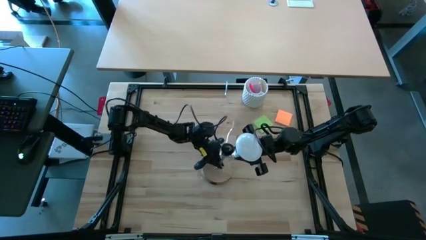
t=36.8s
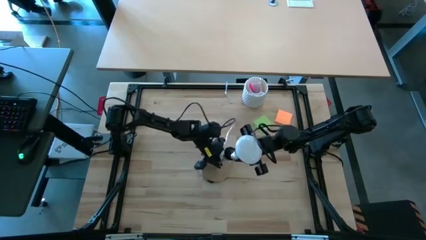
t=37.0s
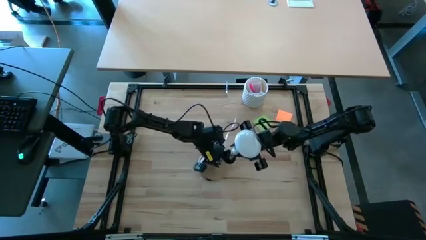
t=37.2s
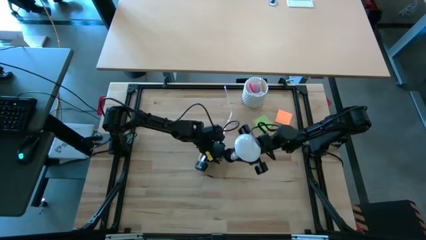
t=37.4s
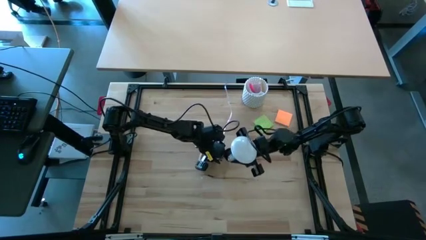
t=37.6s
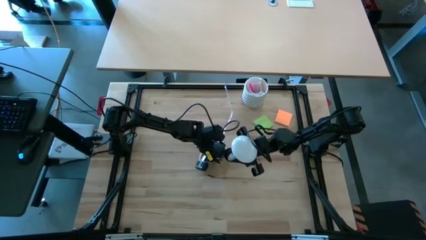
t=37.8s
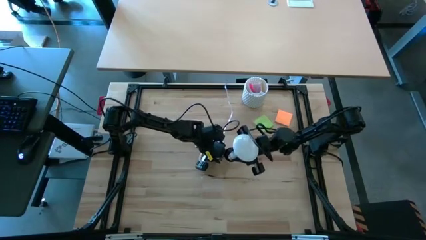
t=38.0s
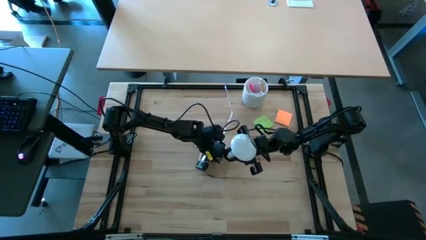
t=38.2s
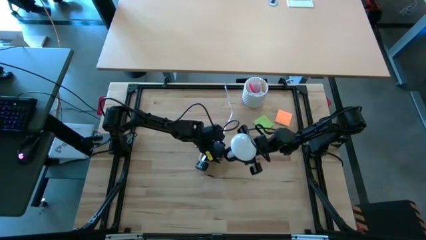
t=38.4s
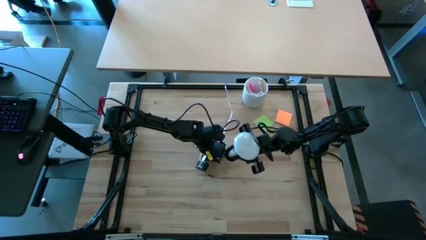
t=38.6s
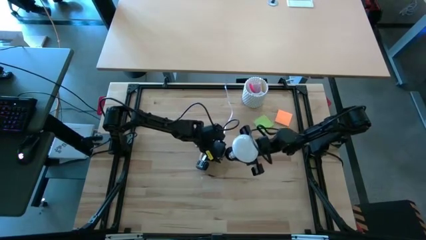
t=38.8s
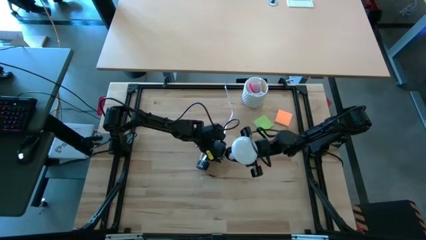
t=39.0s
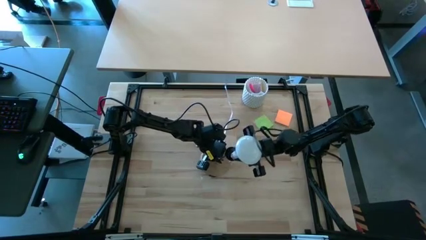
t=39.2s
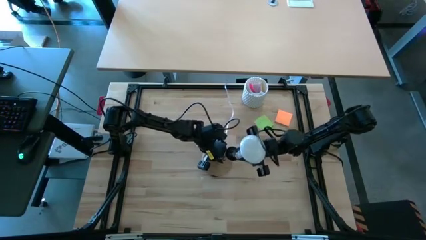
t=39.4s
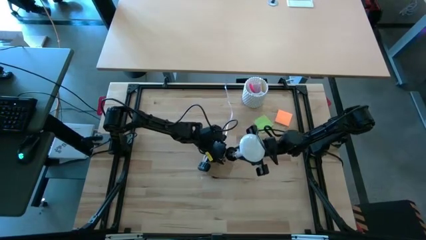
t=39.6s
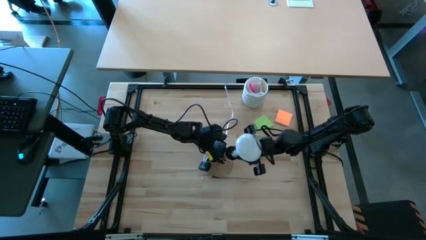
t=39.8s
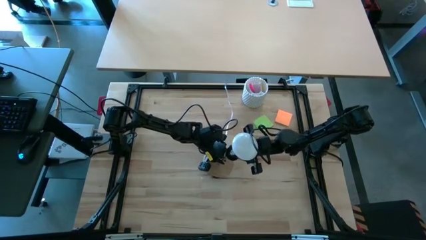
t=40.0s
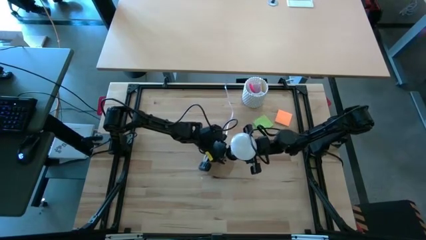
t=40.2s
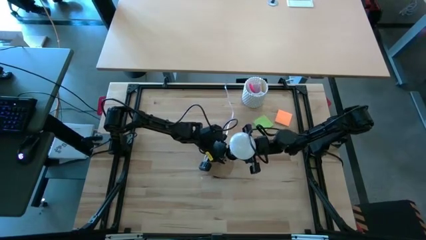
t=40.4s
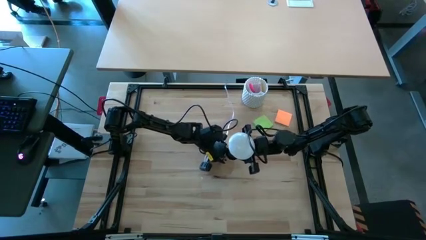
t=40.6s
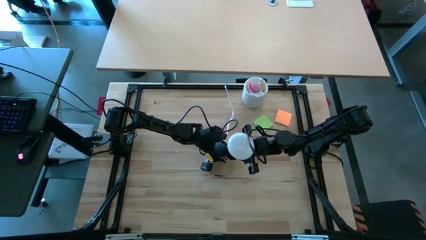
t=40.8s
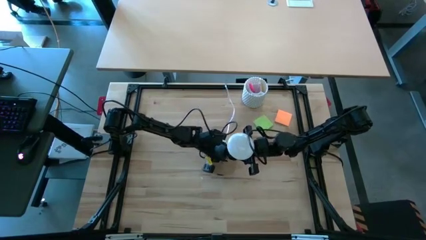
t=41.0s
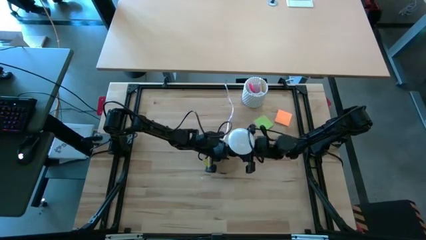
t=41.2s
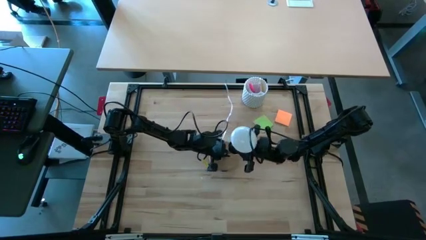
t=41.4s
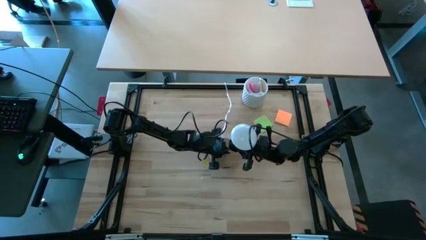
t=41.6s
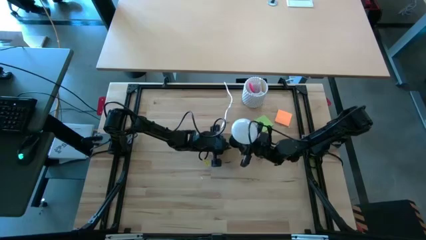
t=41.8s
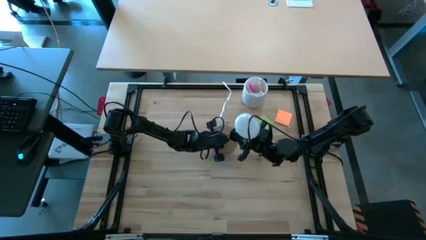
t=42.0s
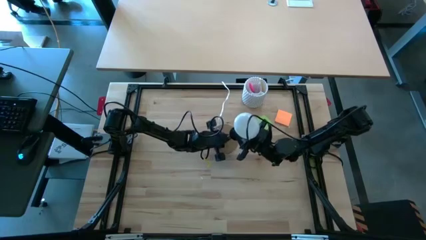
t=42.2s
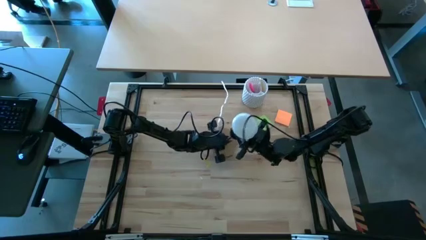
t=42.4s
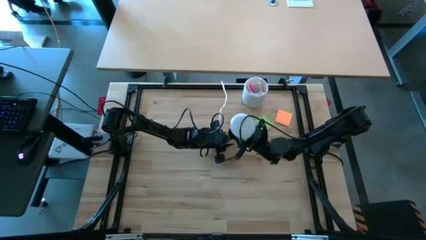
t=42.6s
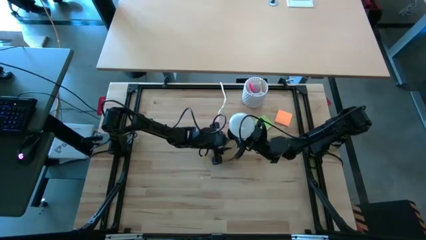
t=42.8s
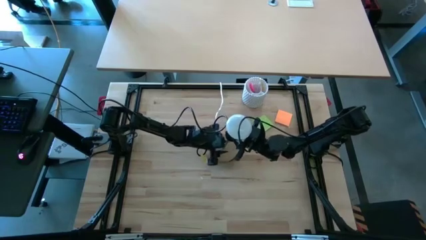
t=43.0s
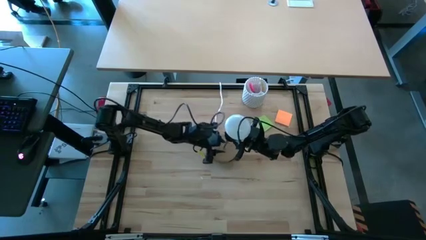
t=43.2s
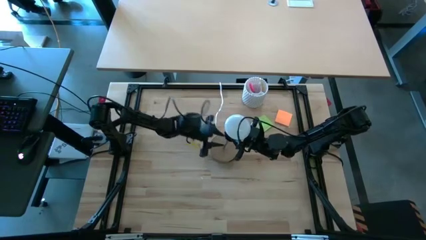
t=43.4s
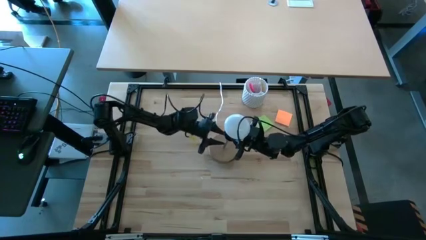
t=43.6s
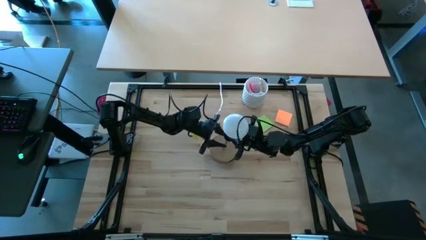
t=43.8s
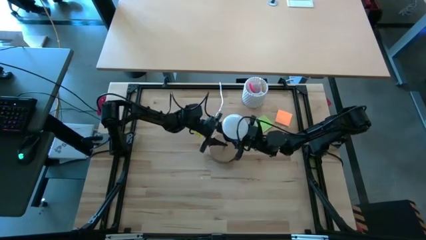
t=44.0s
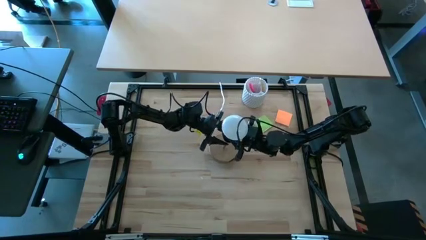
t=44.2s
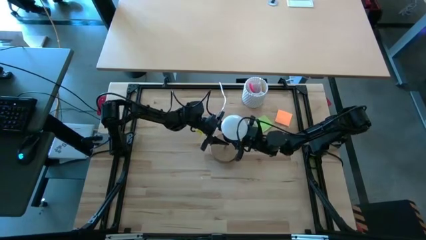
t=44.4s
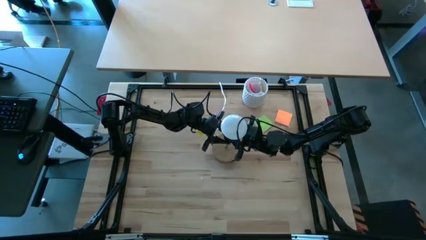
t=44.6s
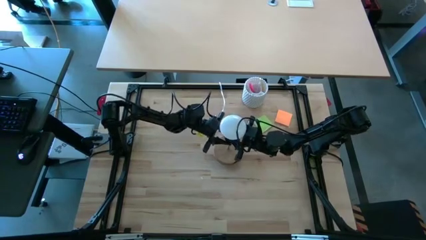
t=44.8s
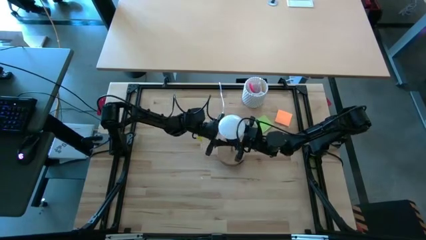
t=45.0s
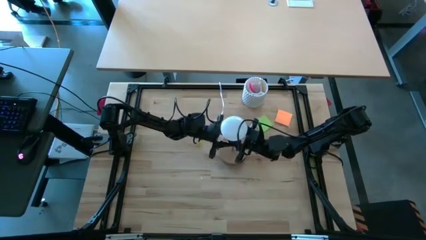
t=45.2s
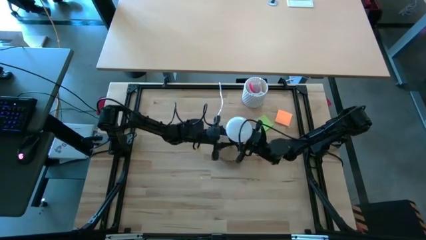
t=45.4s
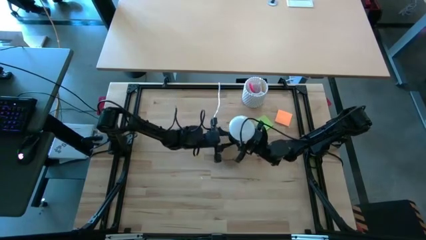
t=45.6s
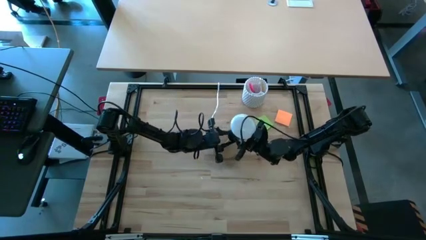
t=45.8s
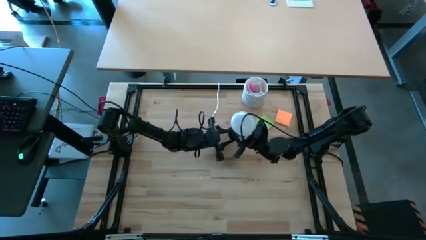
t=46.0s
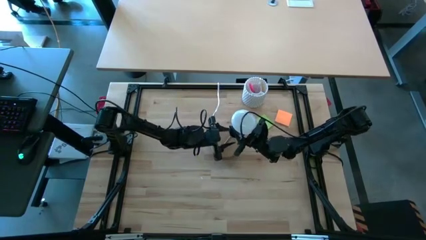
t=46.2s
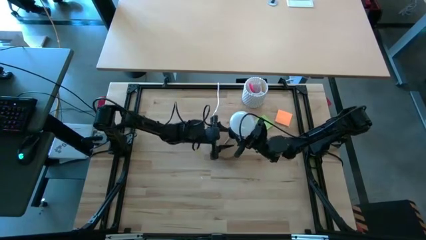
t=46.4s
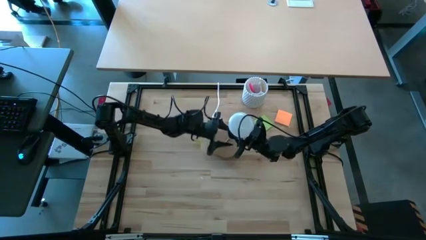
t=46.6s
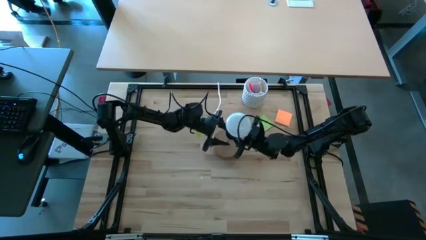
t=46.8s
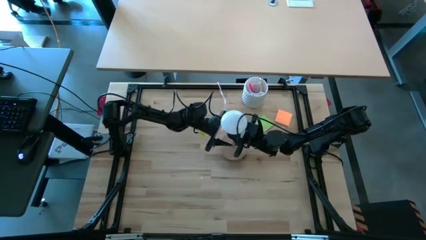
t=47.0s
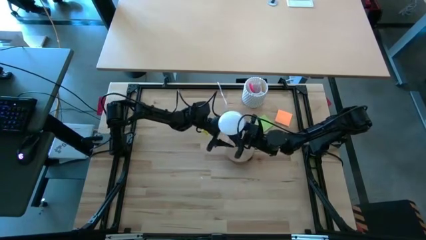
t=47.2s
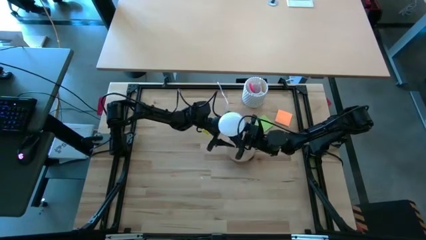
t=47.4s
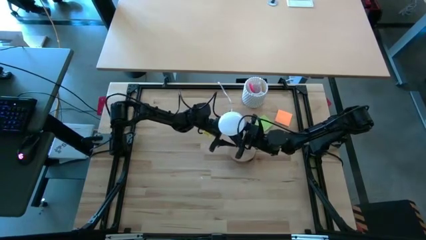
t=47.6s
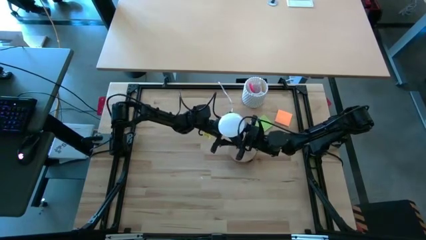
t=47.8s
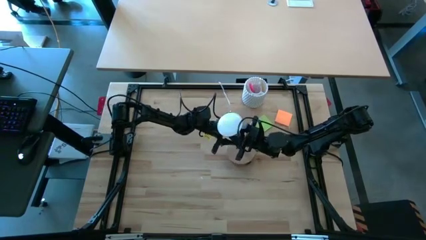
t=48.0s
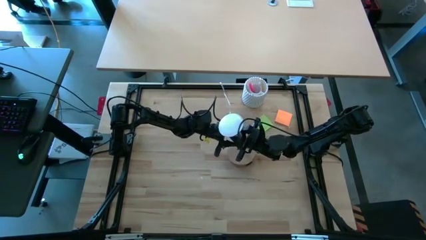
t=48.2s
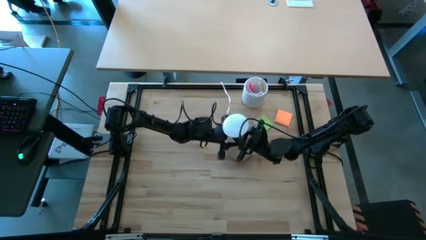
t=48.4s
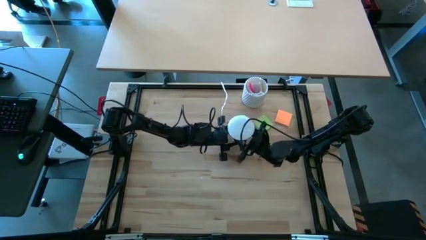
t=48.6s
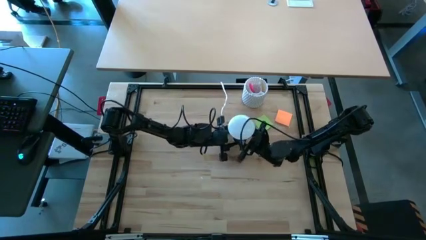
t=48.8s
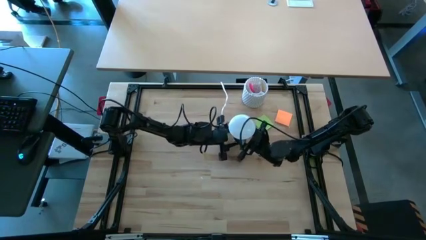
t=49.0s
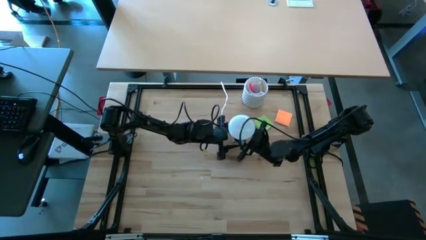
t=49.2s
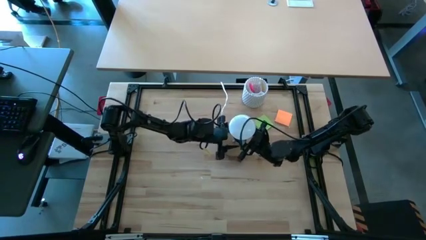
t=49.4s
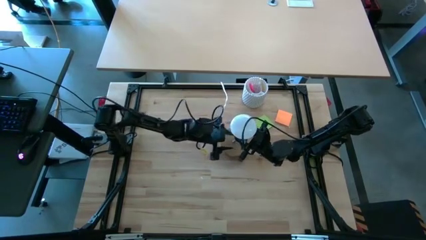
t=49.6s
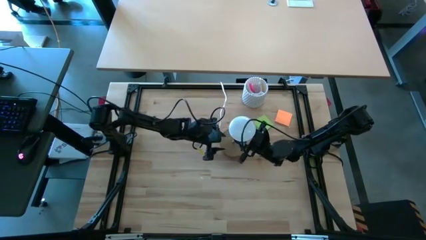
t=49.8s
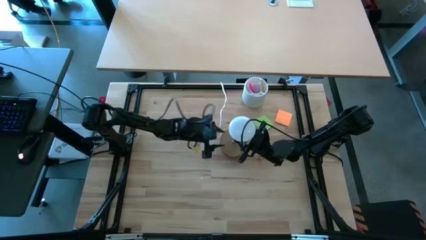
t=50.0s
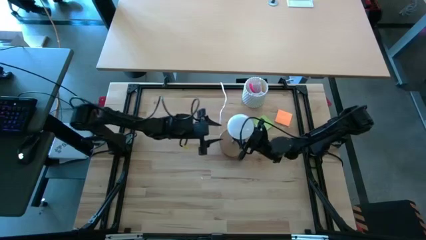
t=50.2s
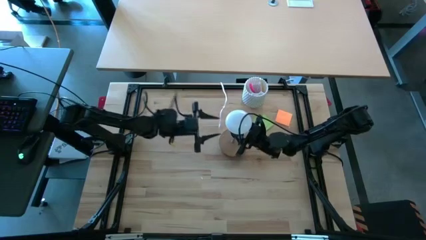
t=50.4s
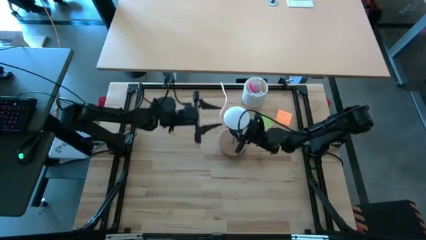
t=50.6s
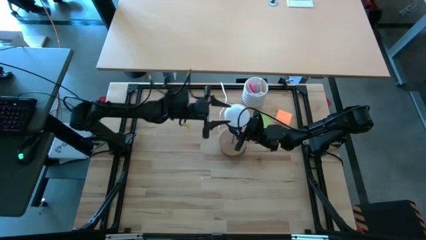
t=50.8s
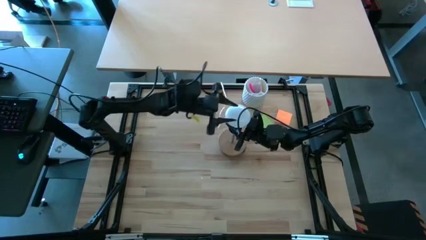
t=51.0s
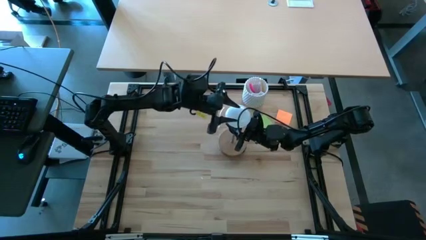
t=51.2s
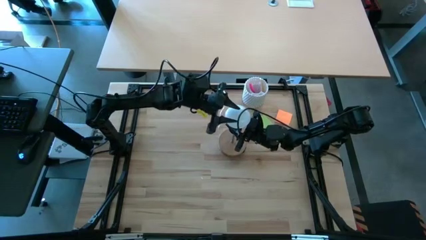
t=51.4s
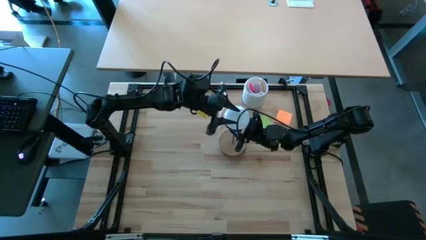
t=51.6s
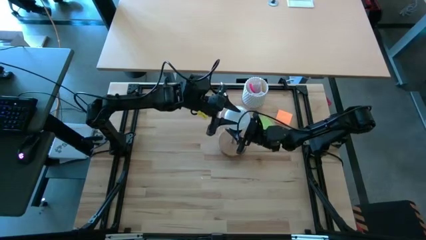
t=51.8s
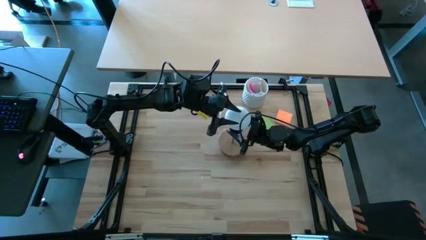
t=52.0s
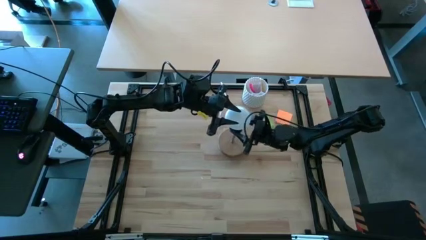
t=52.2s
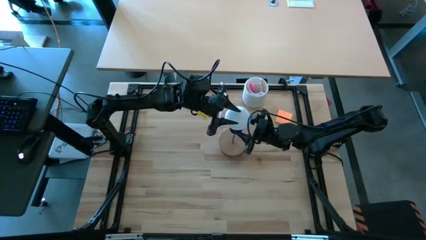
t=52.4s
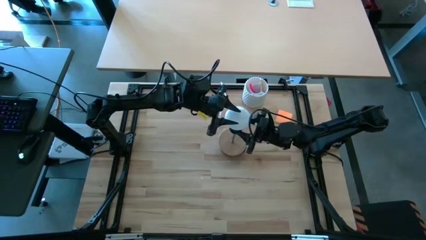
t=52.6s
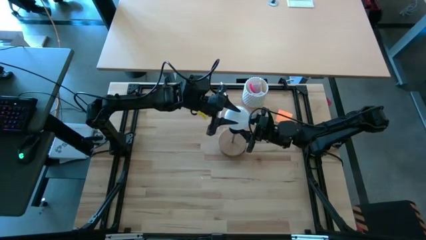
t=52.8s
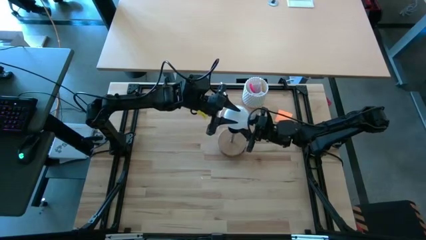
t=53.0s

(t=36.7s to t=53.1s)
Task: Screw lightbulb
Insert the white lightbulb into the brown lamp

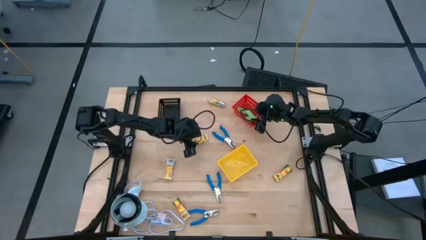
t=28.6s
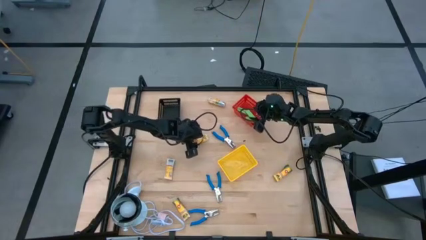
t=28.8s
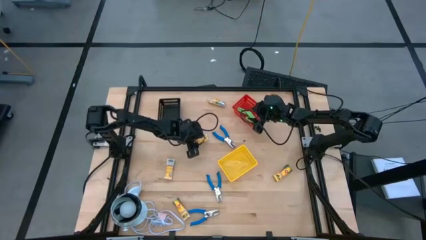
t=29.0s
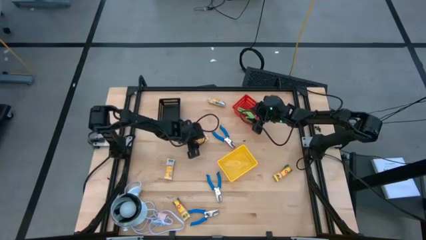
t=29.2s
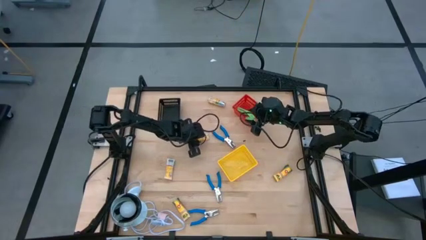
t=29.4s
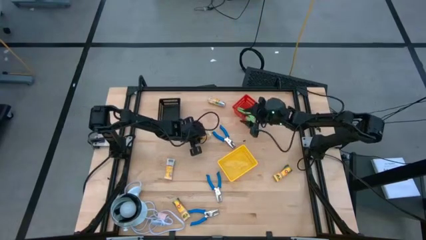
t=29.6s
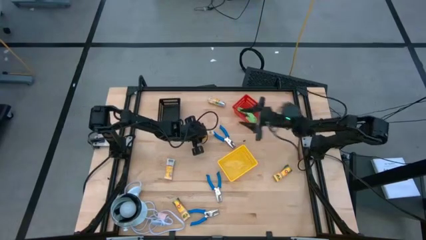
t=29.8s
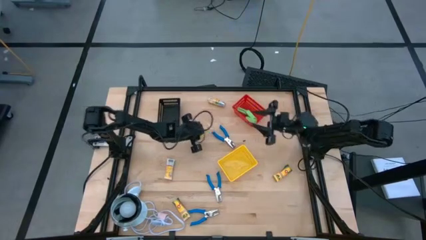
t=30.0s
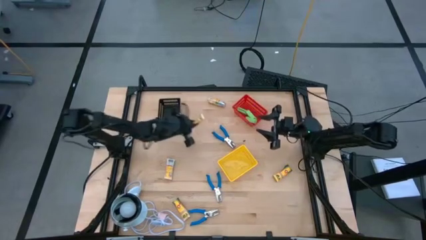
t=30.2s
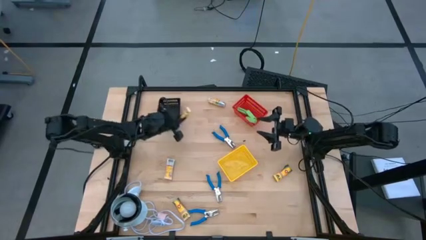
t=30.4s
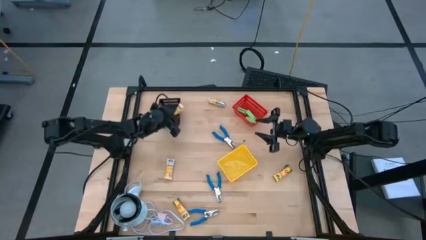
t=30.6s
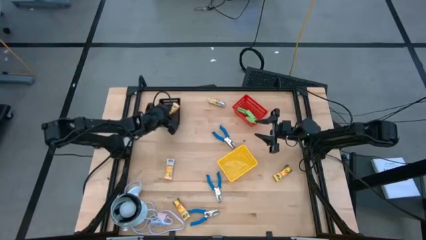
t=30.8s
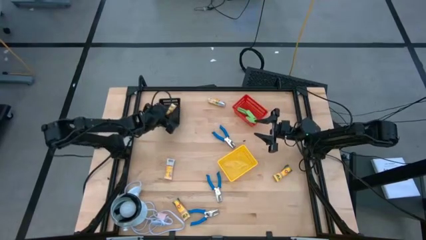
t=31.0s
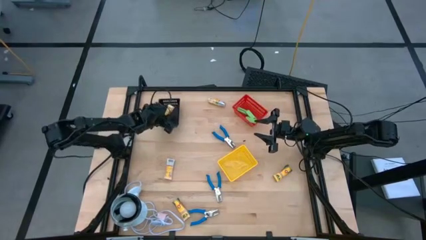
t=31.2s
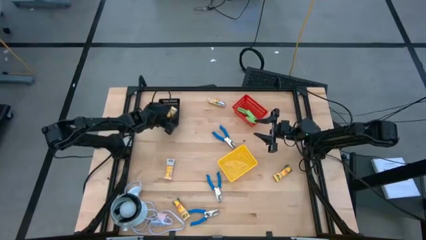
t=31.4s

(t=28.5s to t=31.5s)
Task: Pick & Place School Supplies
Put the yellow crayon pack into the black bin
